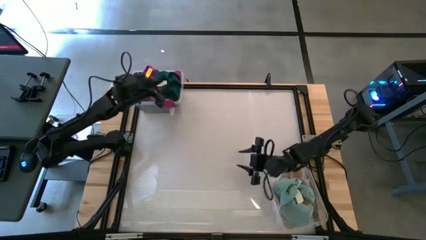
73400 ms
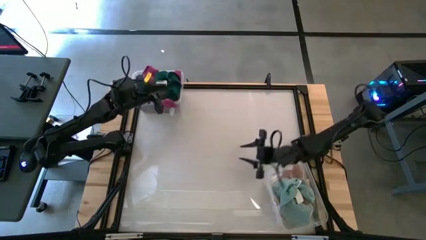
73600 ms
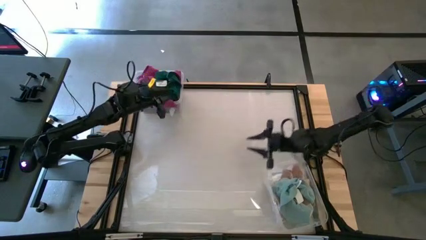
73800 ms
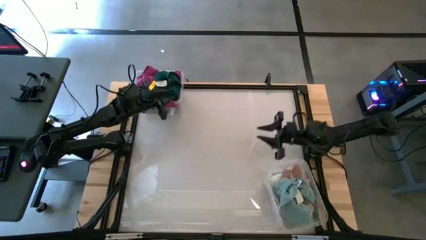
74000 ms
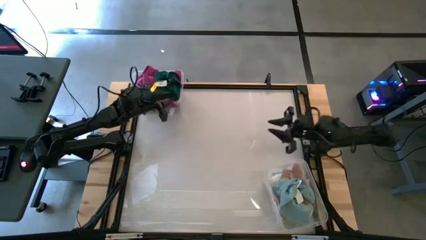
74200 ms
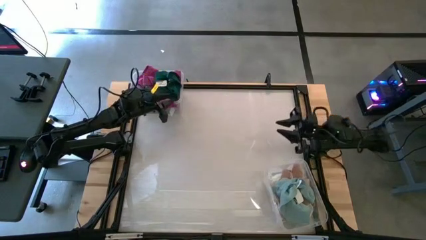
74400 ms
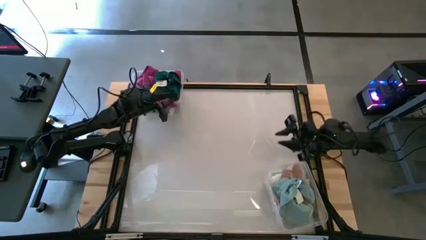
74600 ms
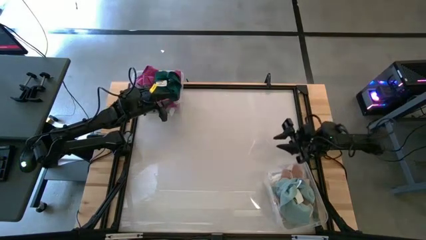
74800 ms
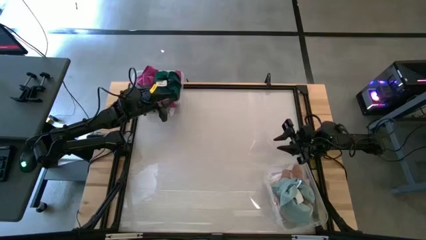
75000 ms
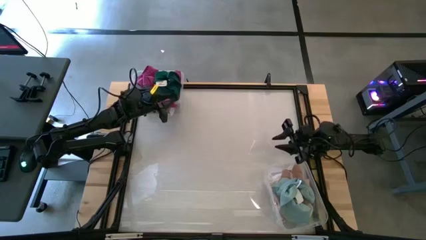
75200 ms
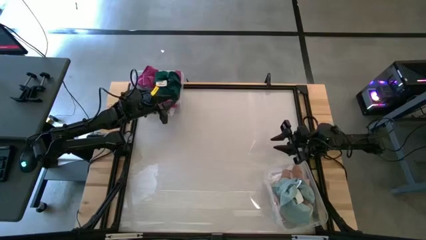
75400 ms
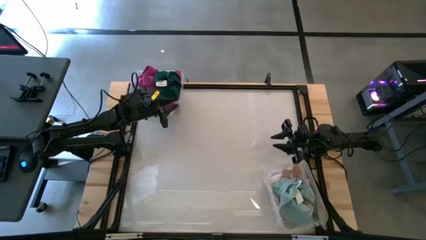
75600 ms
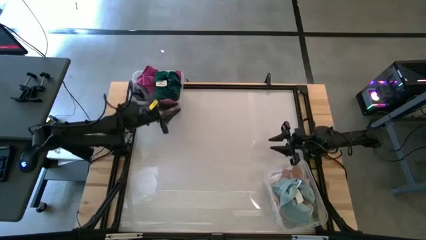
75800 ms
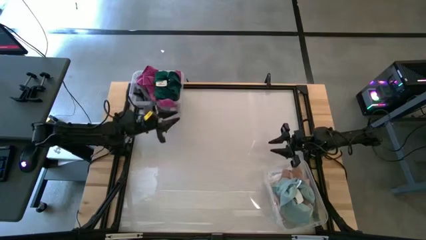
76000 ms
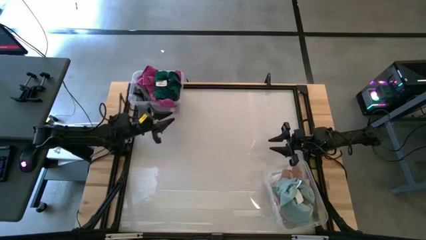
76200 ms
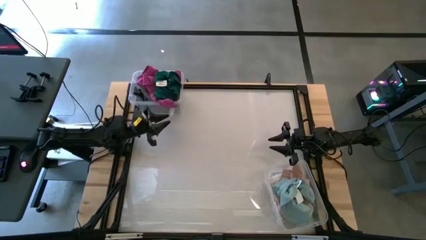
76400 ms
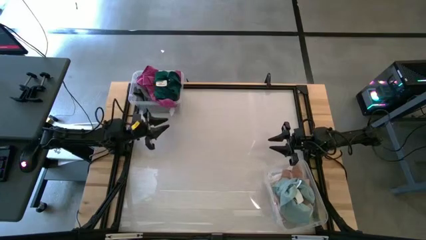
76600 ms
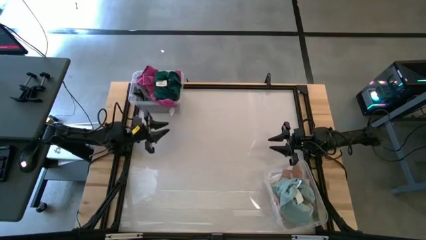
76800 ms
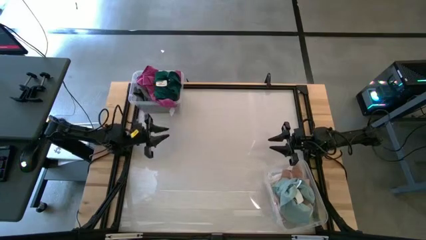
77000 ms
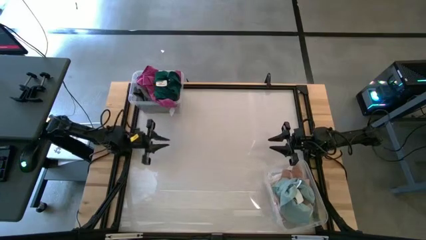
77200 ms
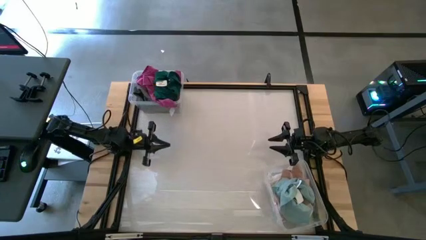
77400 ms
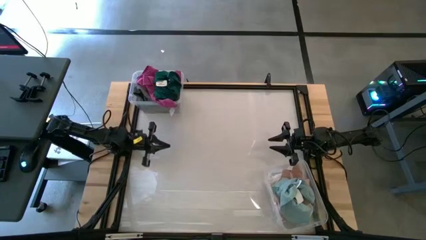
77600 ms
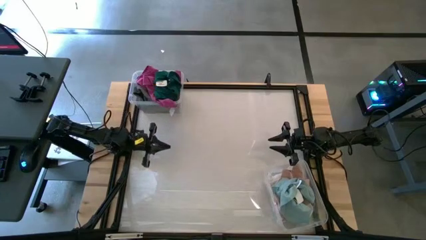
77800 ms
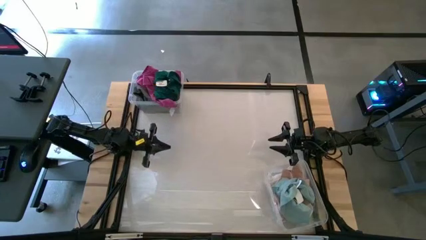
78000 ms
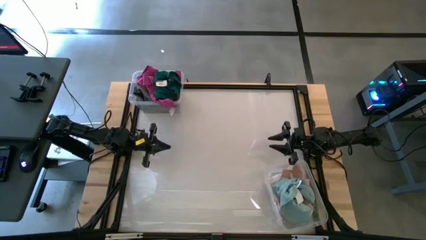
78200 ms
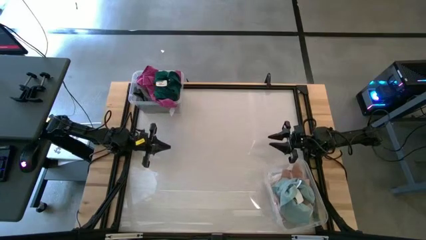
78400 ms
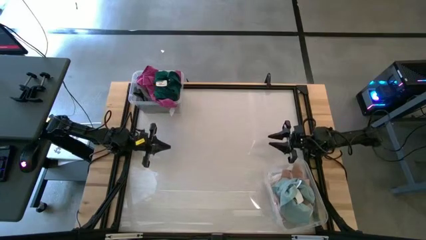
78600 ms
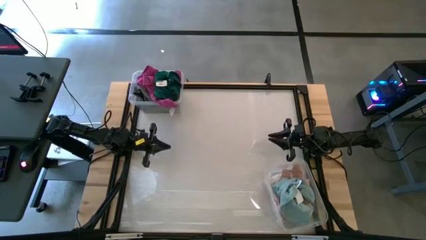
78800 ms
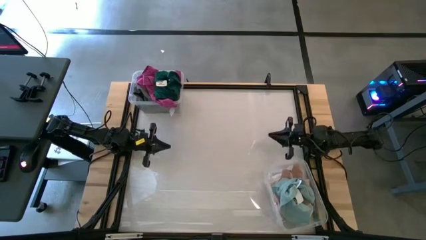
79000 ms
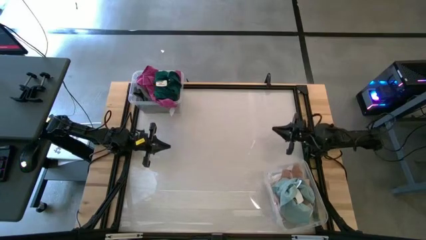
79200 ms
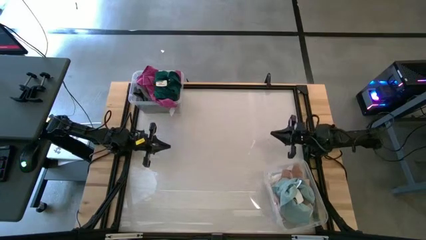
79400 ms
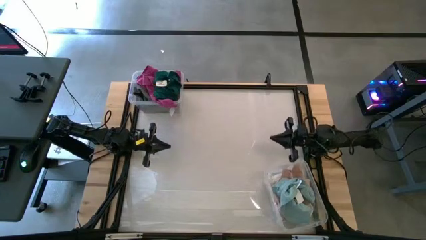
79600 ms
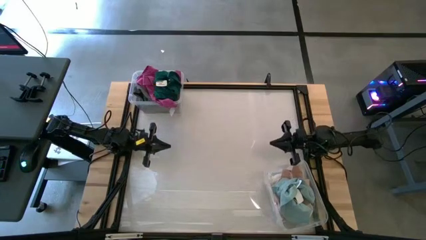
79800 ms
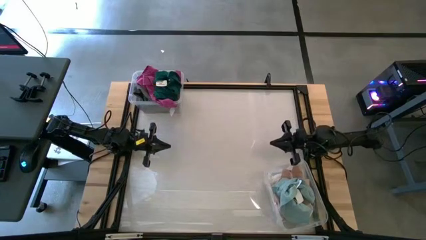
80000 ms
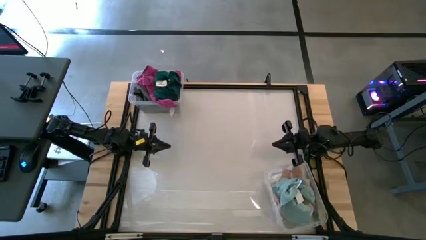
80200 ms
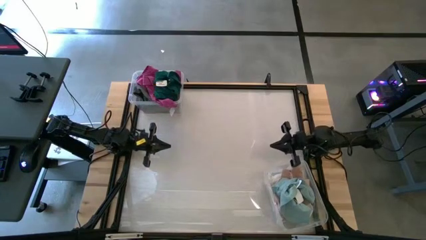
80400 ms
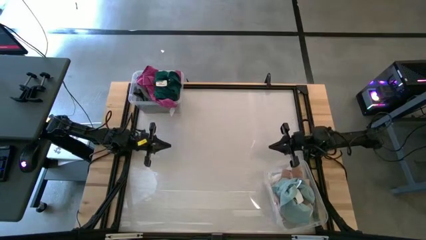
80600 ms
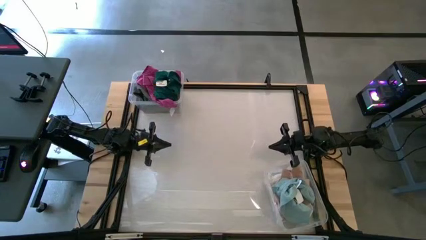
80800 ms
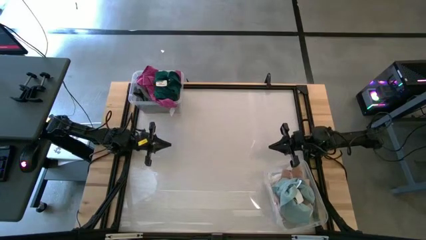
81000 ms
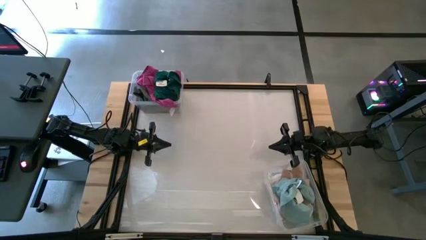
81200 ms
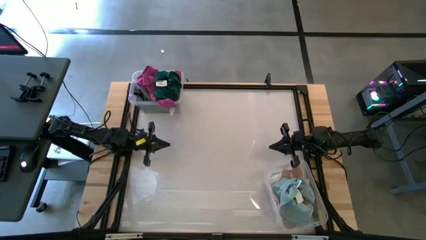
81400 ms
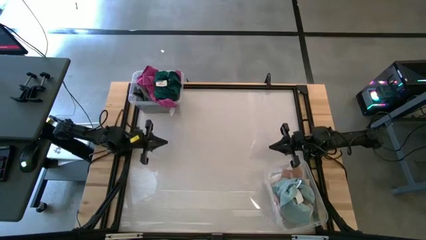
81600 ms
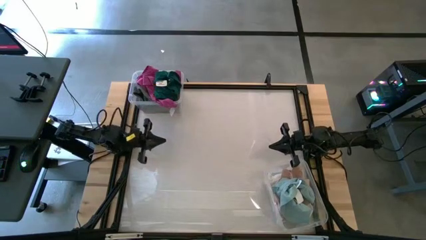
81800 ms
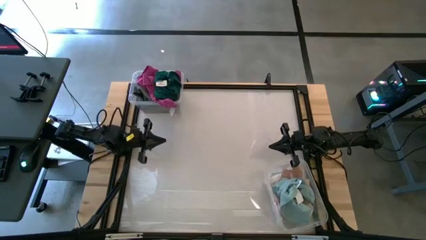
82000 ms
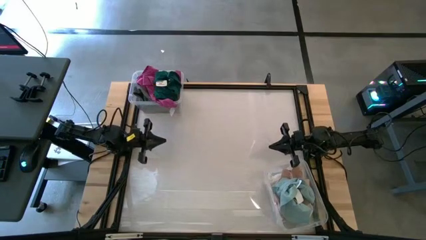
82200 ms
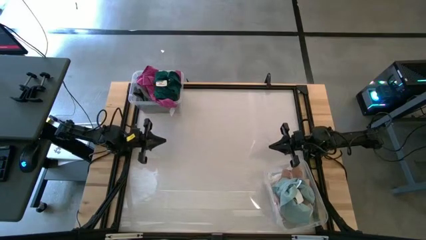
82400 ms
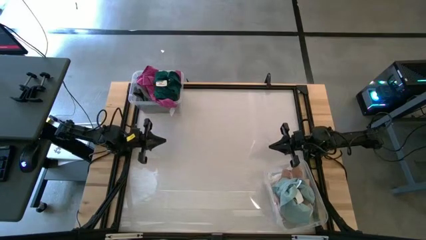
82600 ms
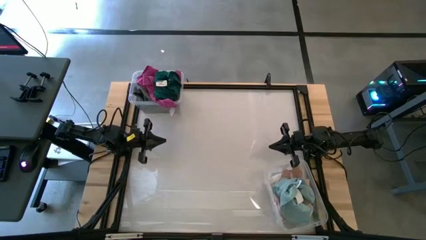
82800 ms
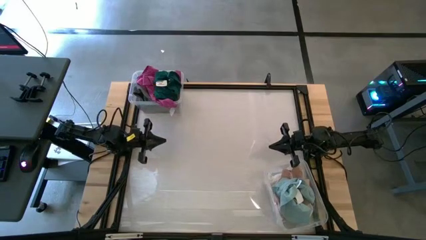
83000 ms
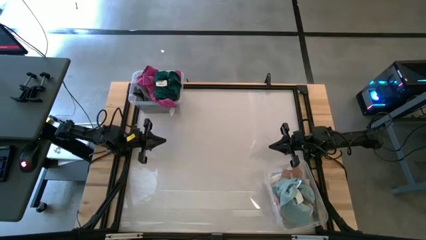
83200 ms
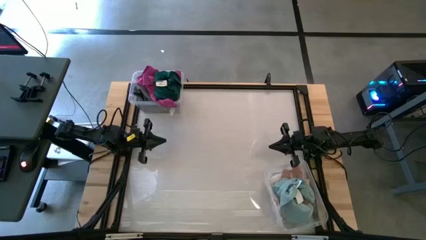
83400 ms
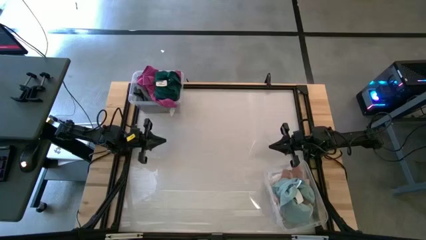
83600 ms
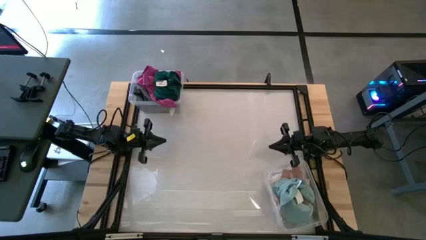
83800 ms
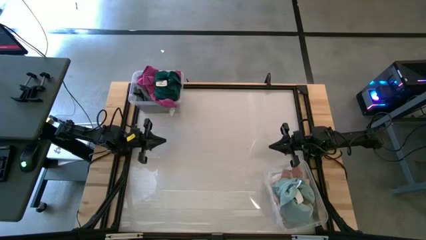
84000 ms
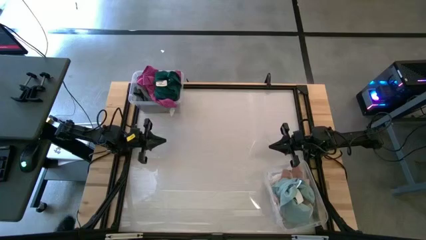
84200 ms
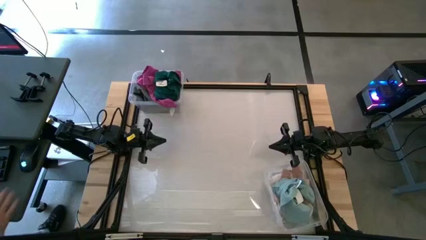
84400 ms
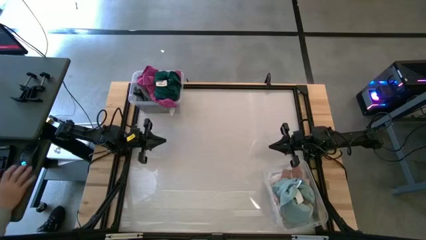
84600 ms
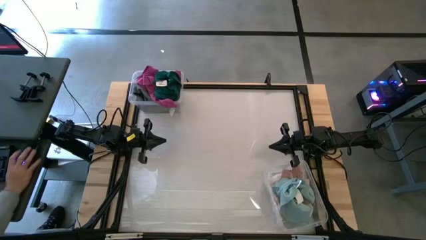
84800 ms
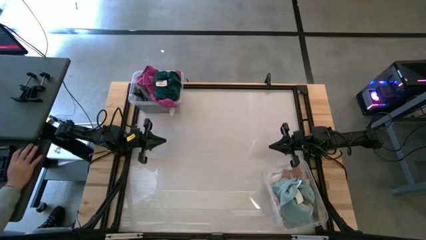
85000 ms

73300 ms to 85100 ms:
Task: Sort microfiber towel by color & place in baskets
Return to Home Position
